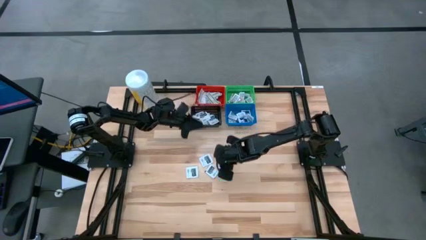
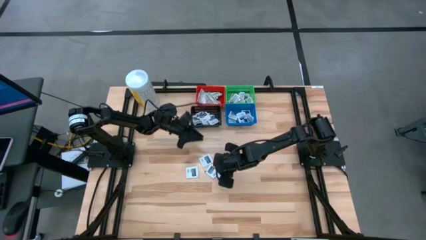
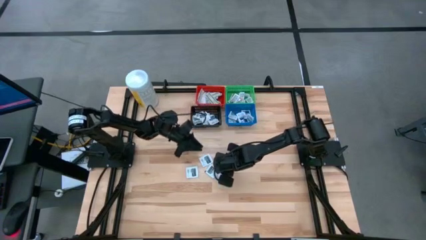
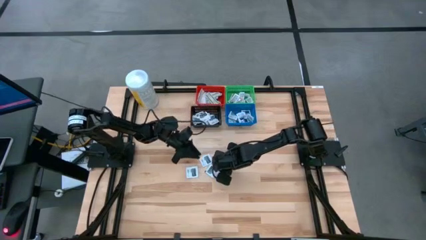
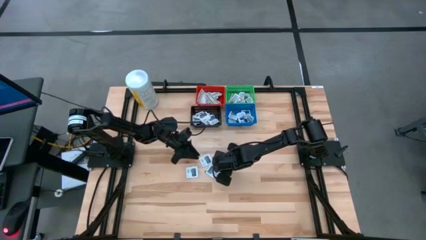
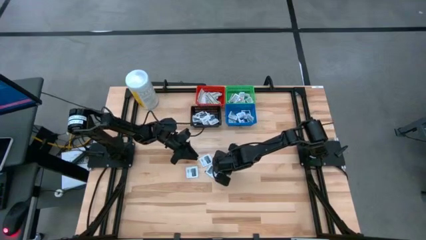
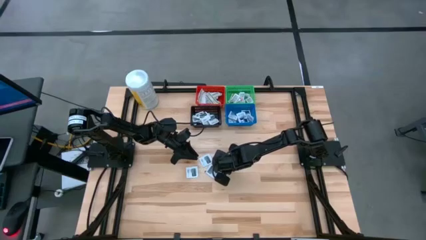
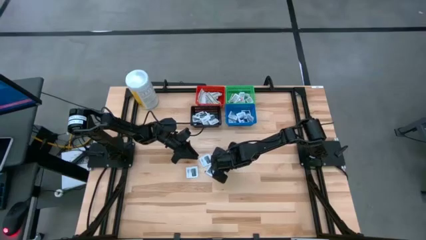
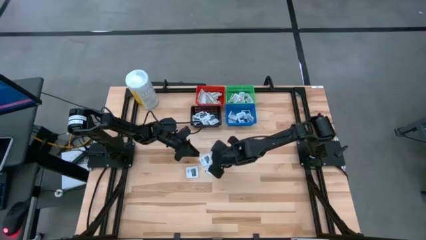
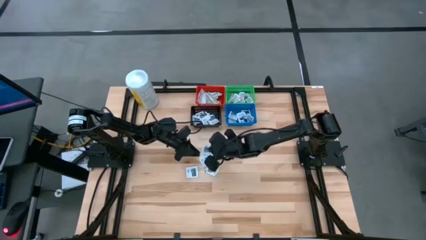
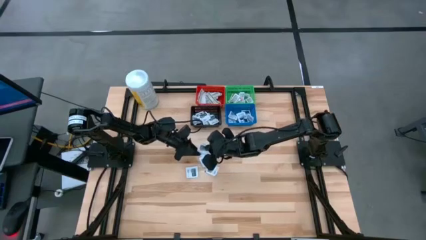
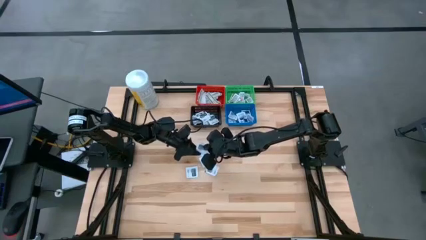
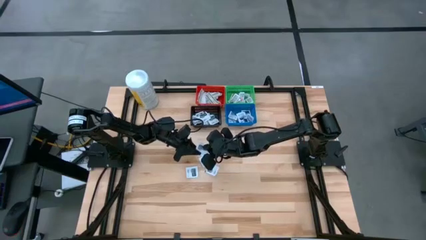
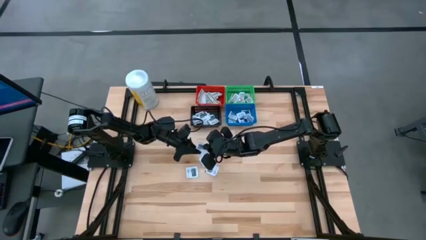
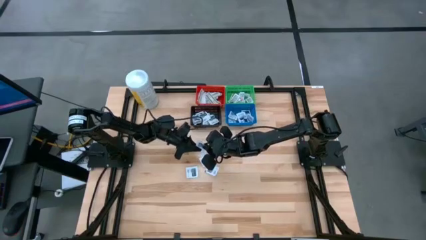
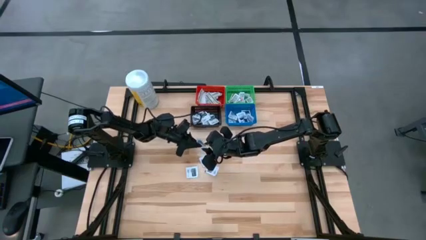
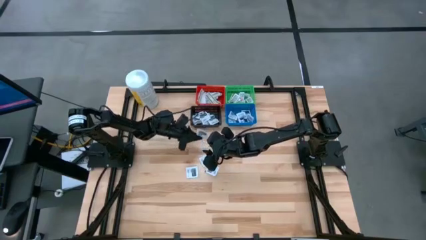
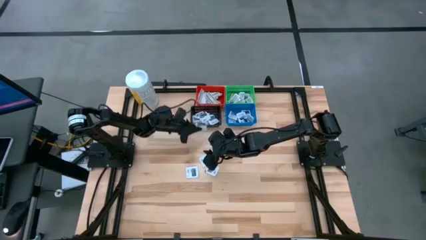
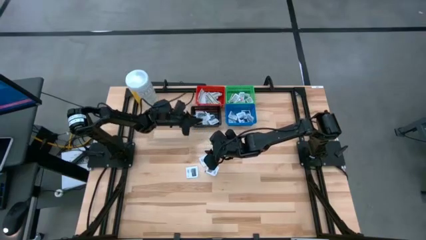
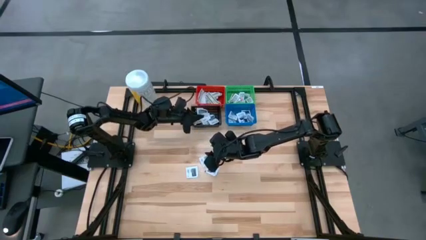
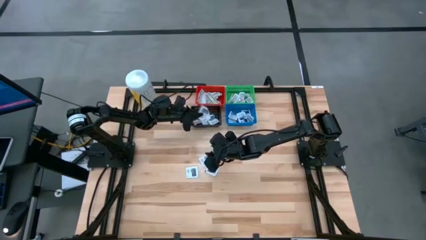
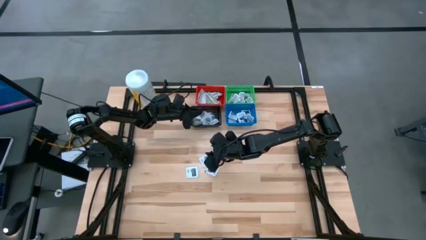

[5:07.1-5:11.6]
Task: Pick & Place First Aid Supplies
Put the towelette pack into the black basket

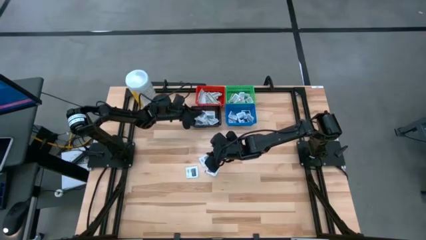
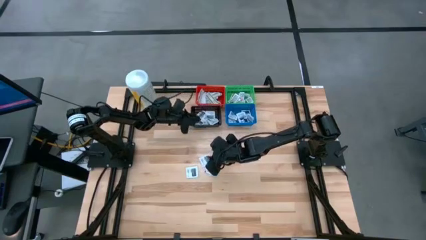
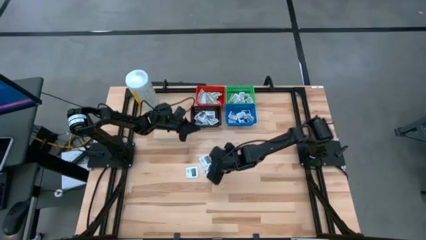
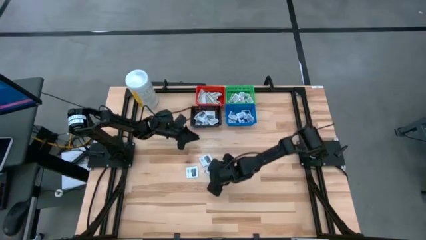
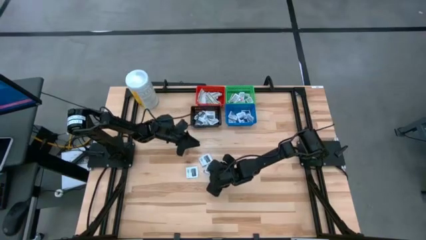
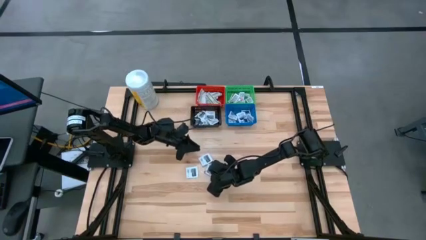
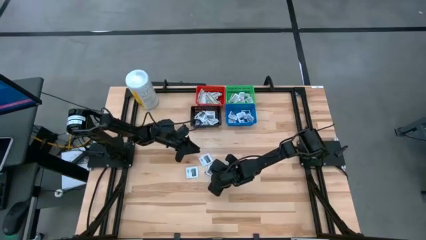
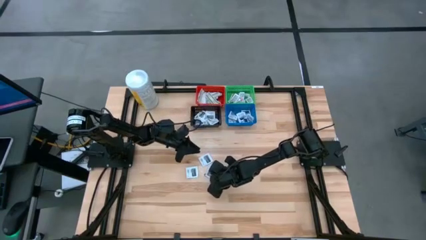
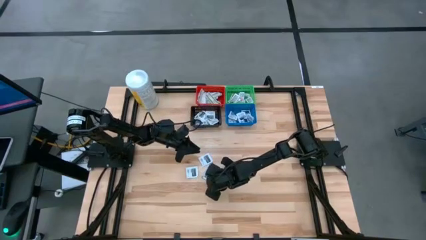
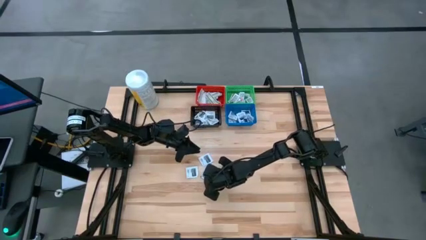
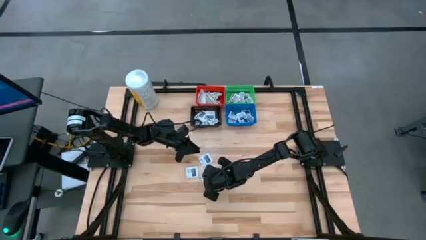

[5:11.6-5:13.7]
Put the towelette pack into the black basket

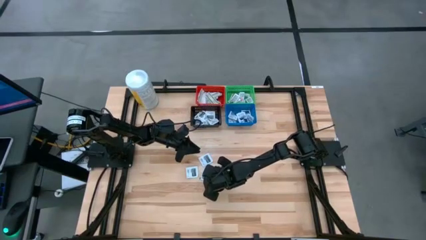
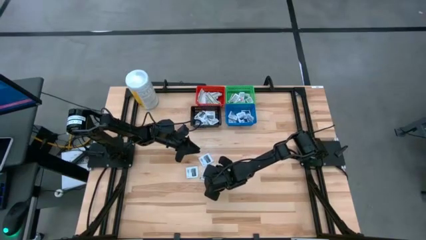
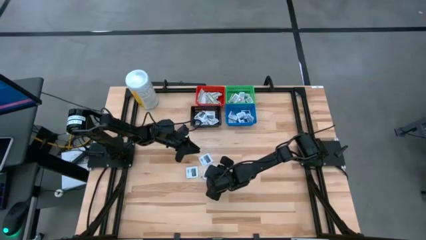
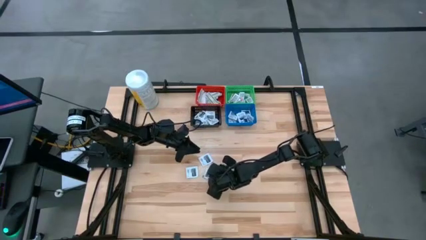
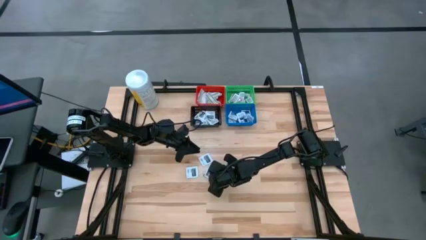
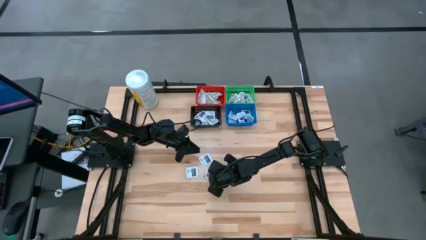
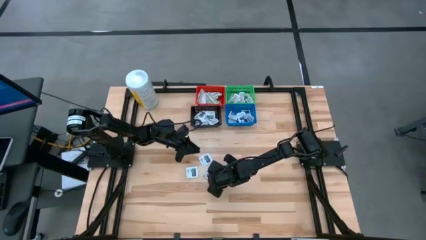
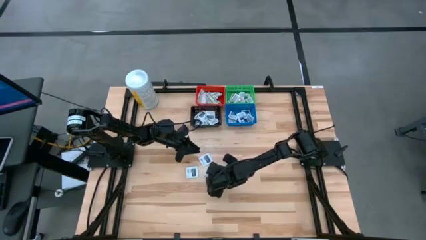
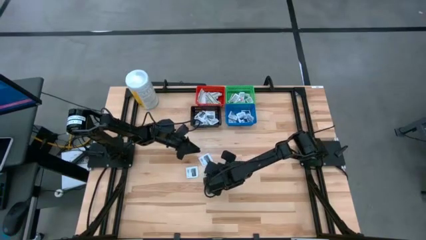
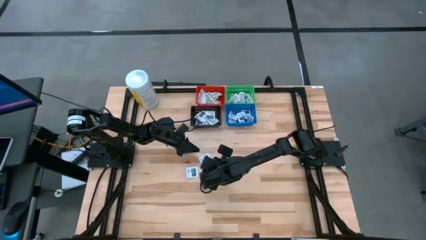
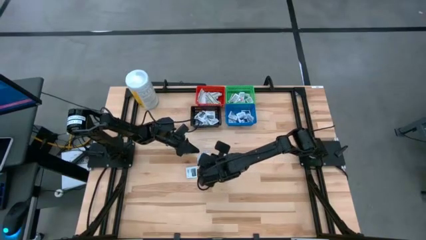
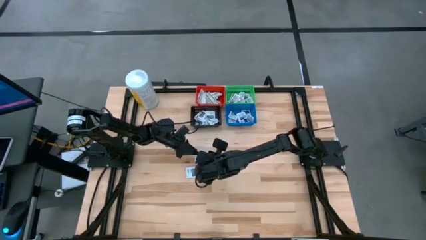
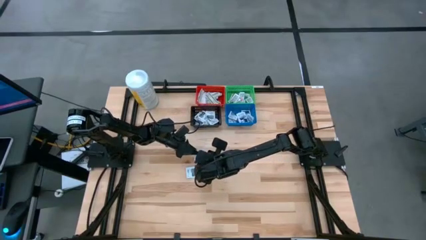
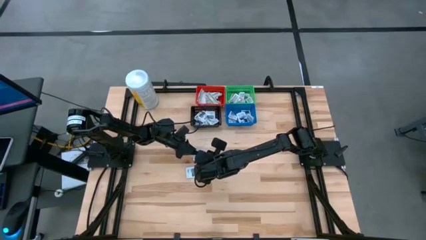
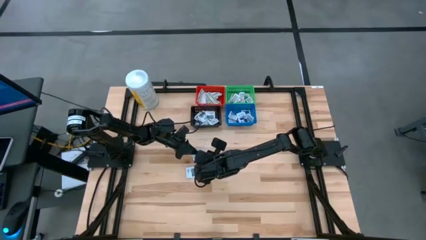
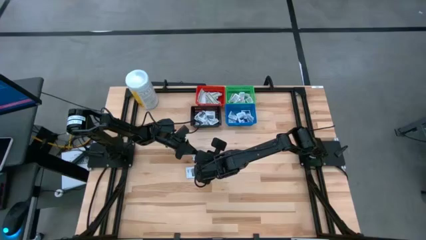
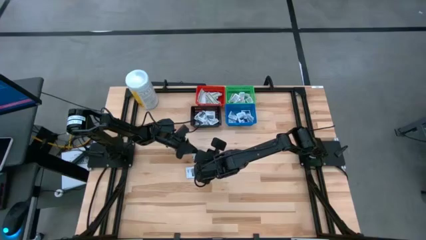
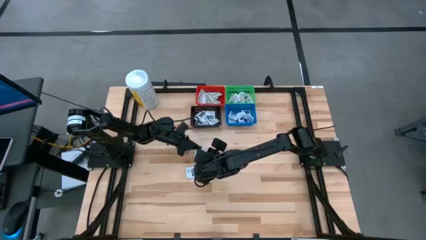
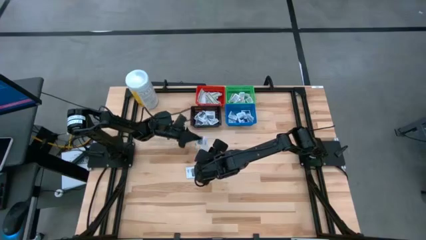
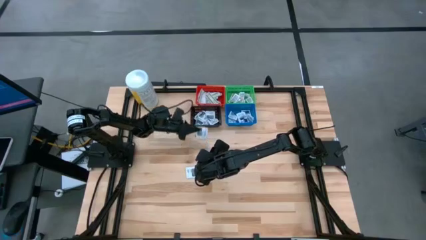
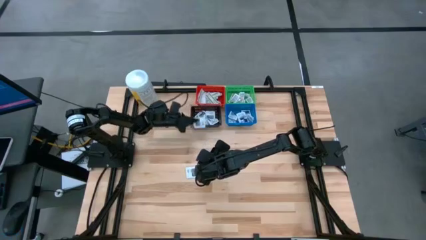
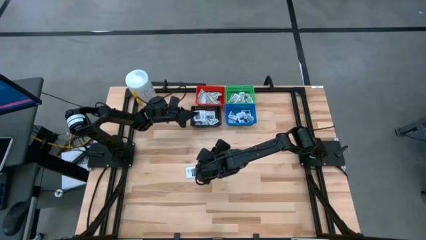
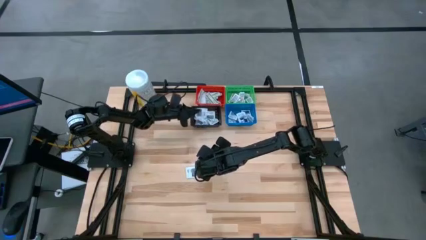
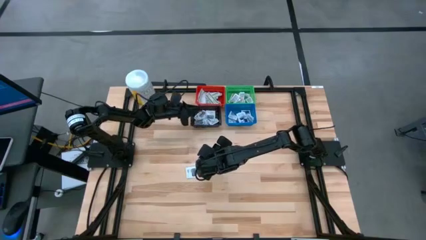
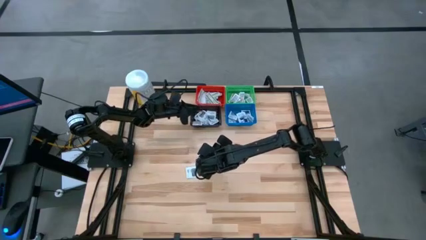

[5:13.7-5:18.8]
Put the towelette pack into the black basket

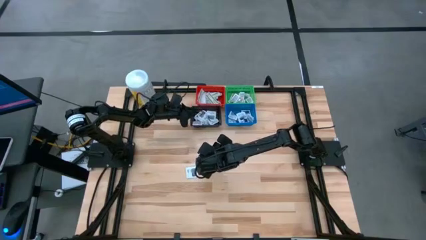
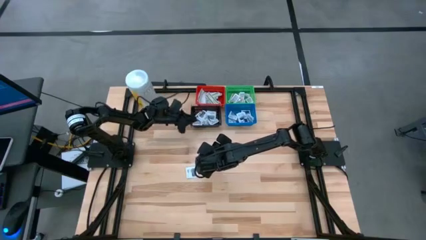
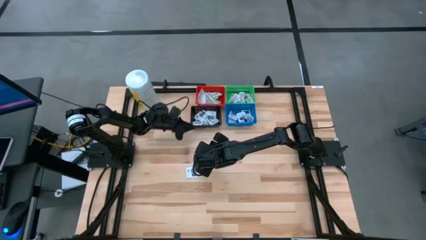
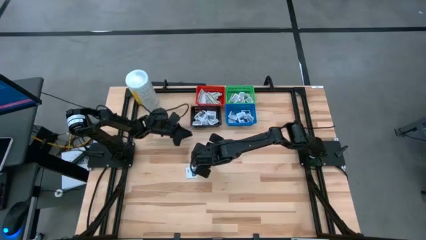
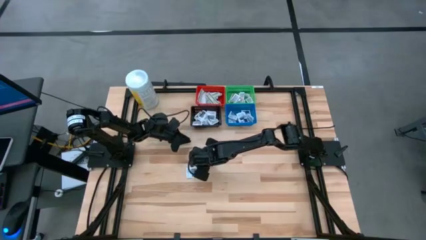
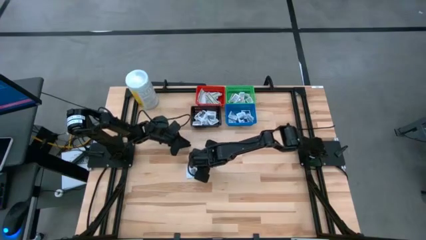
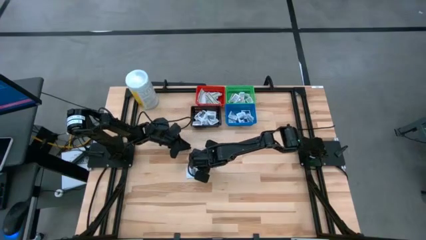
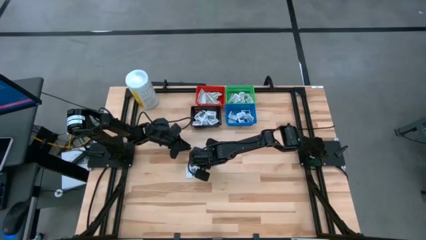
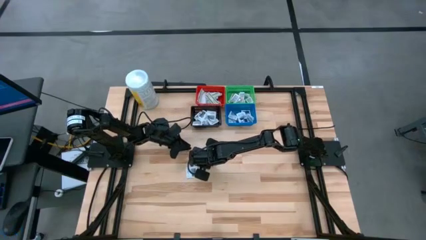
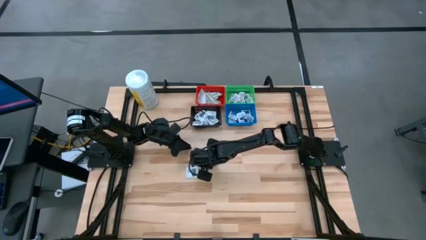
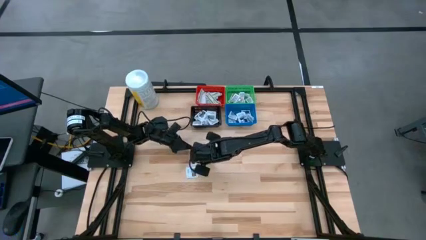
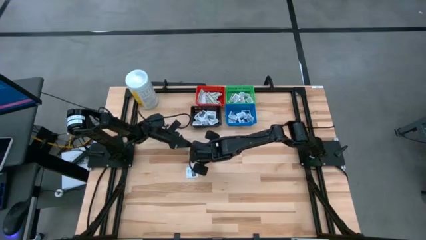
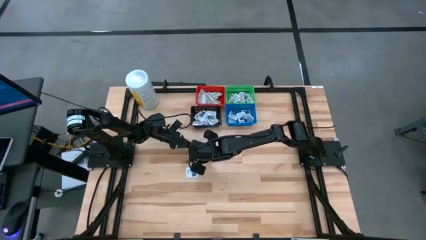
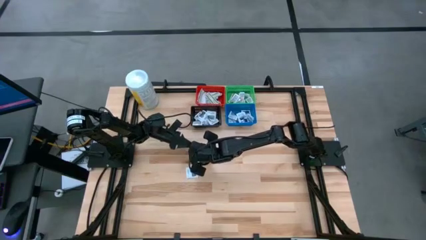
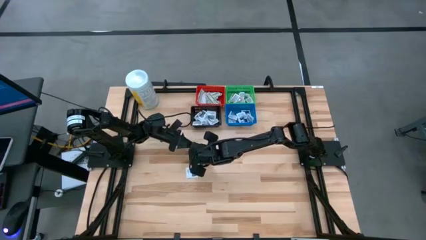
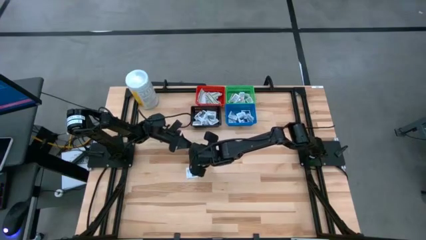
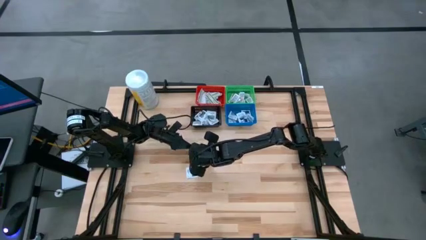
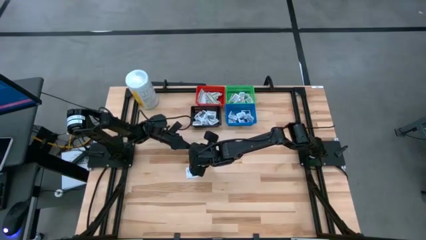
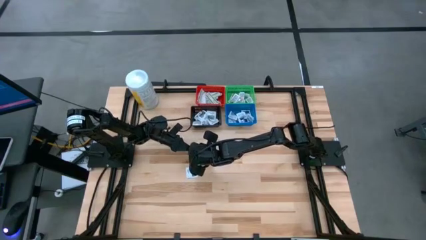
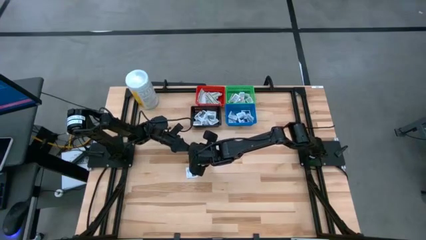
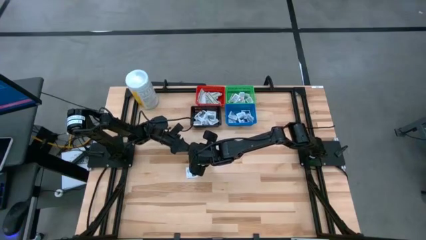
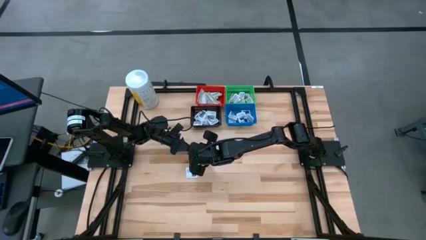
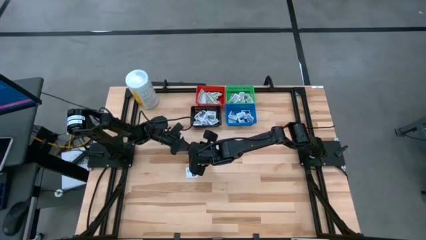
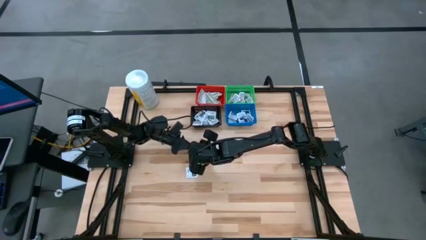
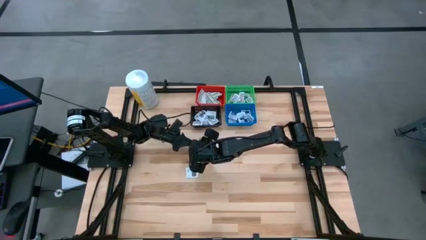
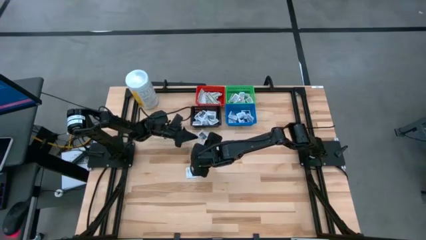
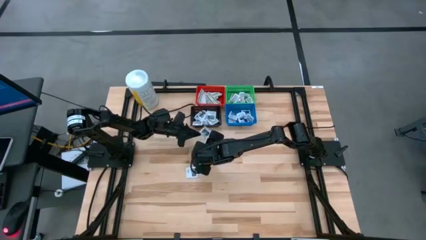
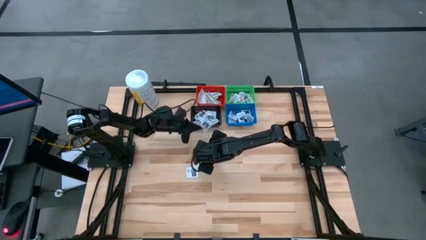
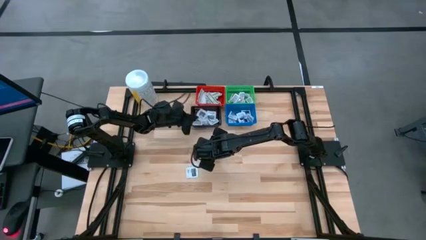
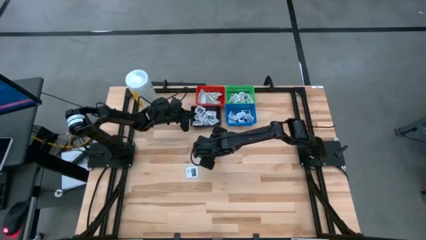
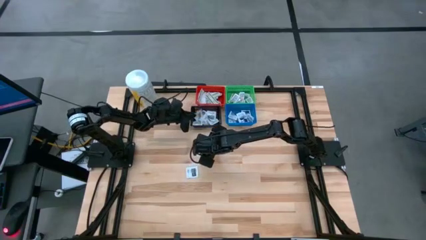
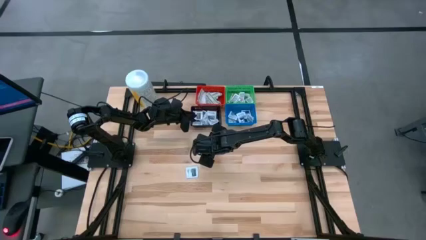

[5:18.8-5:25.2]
Put the towelette pack into the black basket
